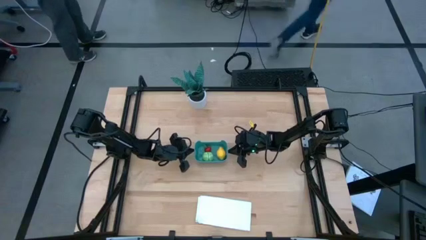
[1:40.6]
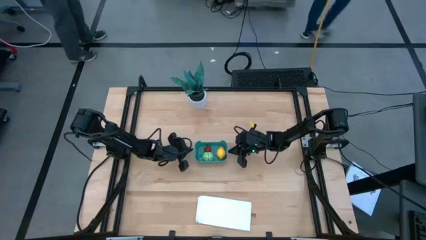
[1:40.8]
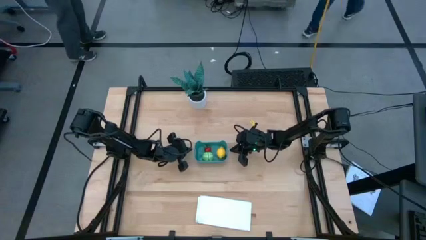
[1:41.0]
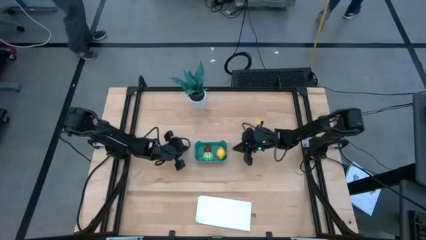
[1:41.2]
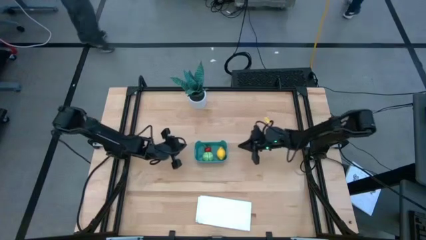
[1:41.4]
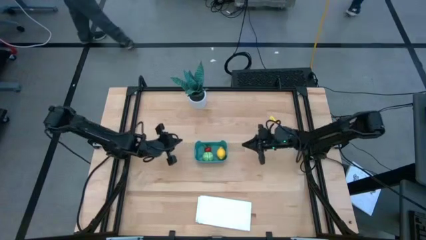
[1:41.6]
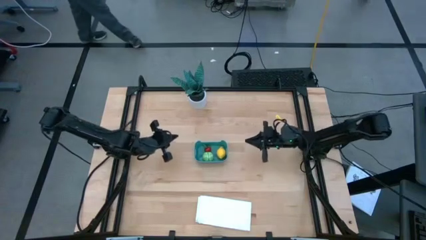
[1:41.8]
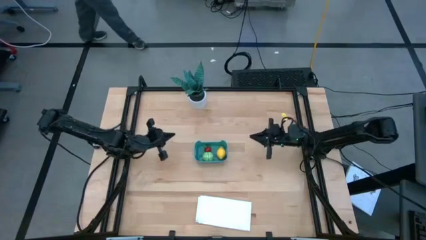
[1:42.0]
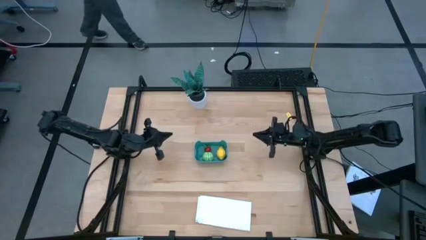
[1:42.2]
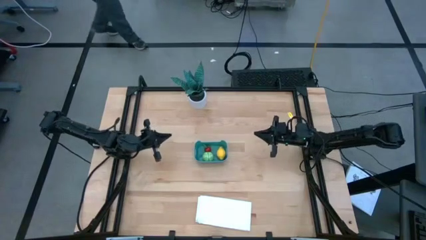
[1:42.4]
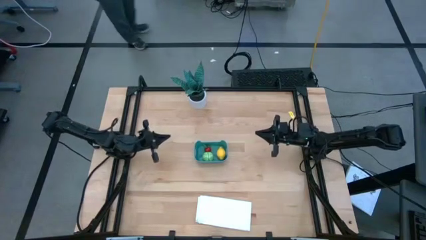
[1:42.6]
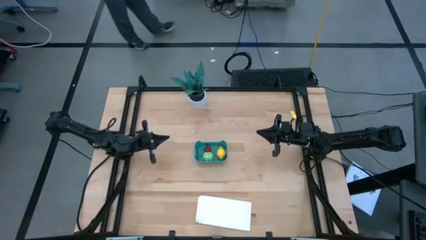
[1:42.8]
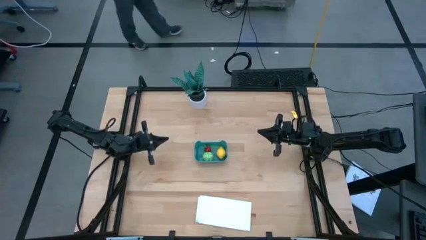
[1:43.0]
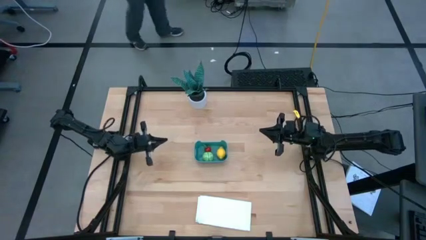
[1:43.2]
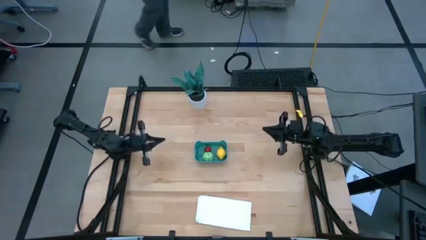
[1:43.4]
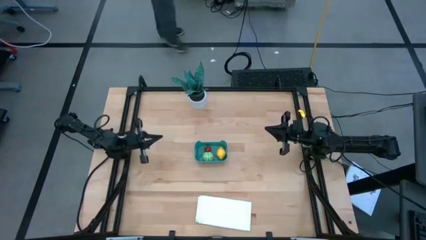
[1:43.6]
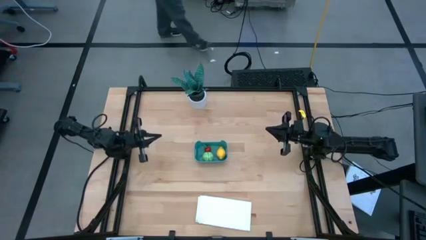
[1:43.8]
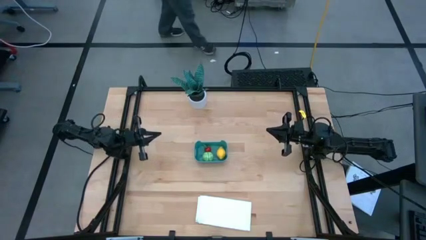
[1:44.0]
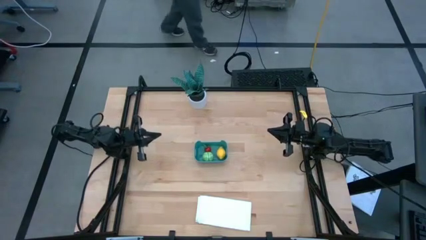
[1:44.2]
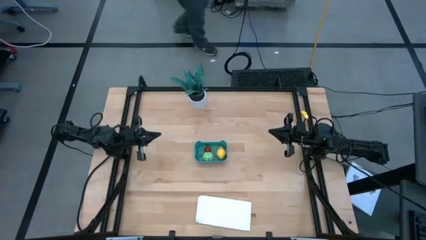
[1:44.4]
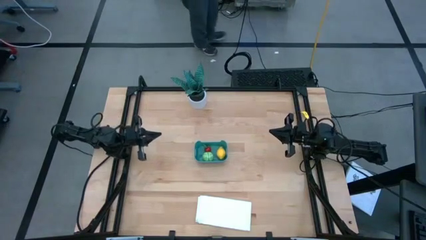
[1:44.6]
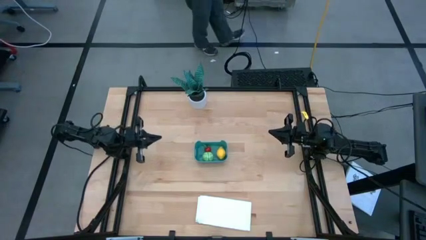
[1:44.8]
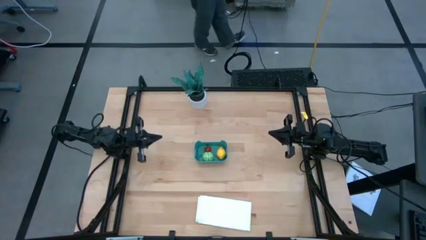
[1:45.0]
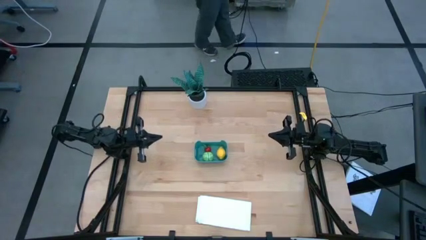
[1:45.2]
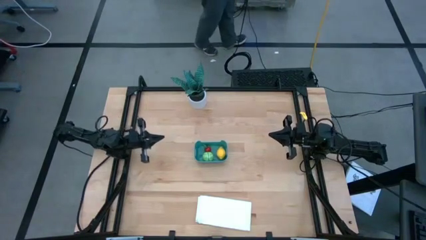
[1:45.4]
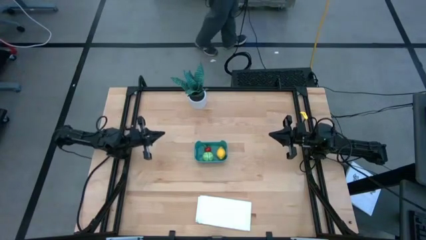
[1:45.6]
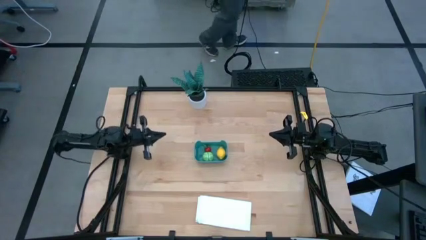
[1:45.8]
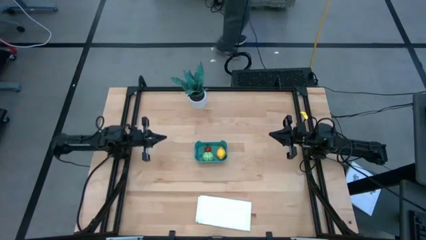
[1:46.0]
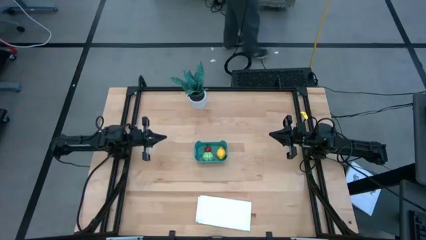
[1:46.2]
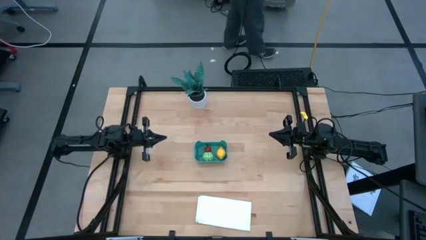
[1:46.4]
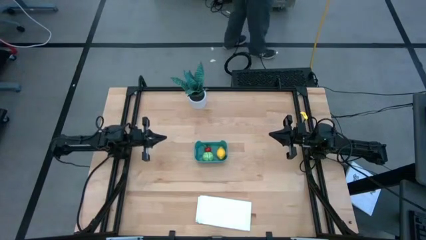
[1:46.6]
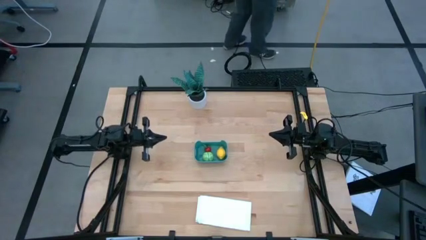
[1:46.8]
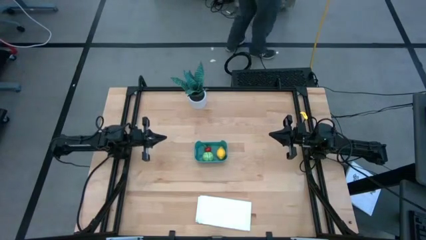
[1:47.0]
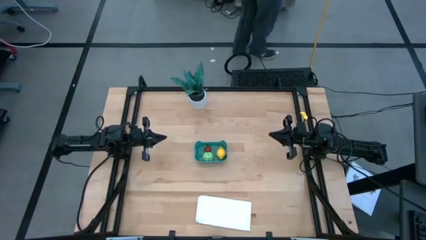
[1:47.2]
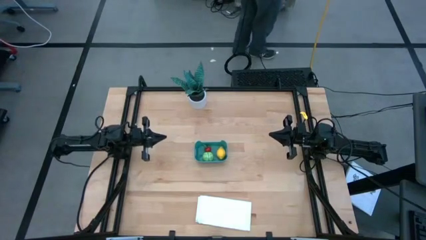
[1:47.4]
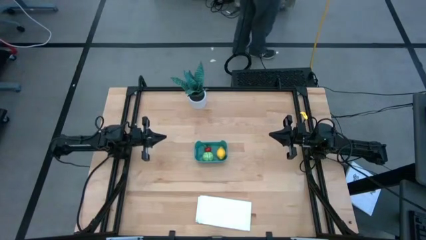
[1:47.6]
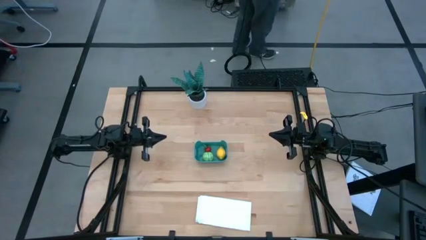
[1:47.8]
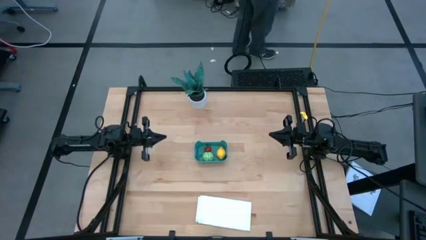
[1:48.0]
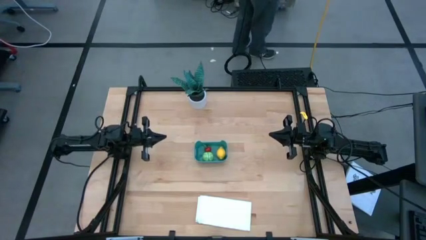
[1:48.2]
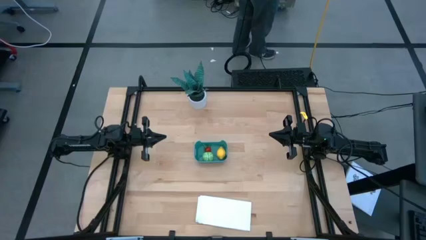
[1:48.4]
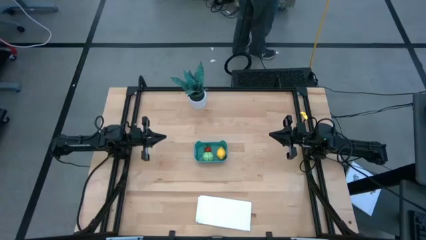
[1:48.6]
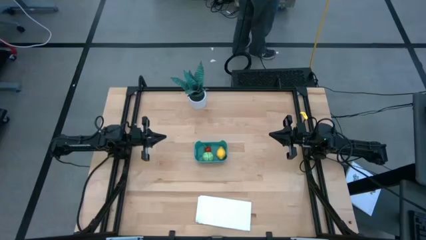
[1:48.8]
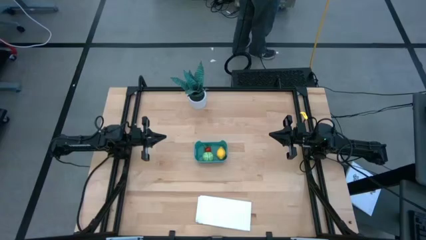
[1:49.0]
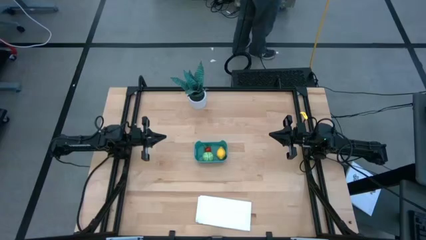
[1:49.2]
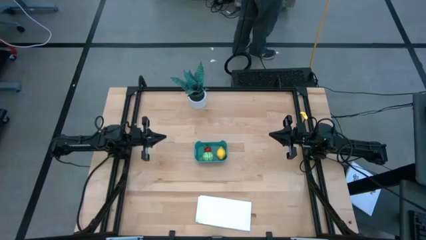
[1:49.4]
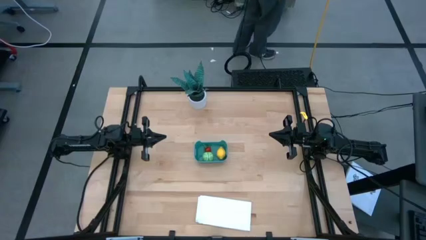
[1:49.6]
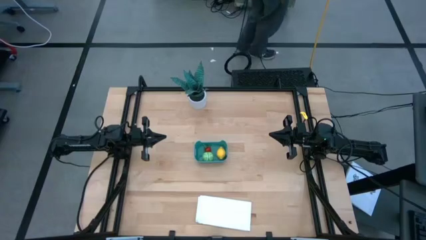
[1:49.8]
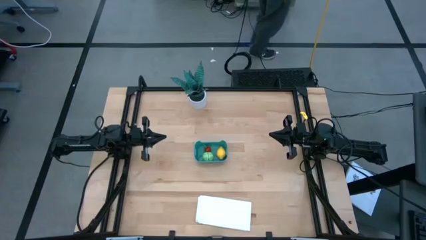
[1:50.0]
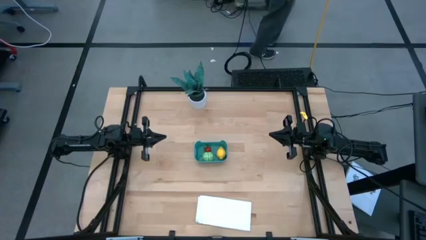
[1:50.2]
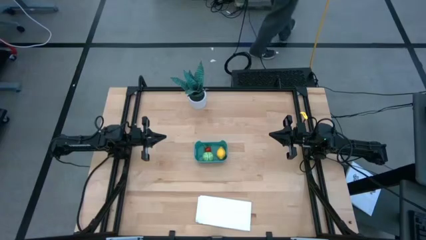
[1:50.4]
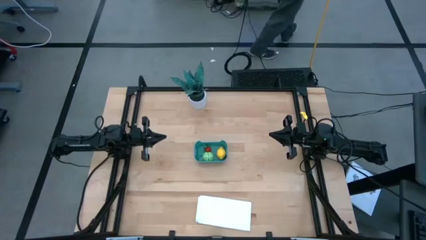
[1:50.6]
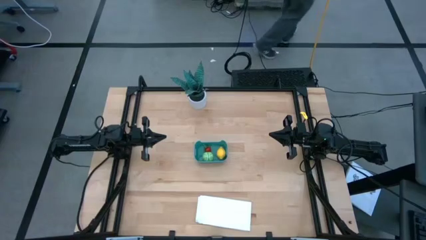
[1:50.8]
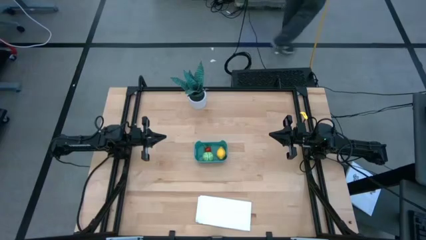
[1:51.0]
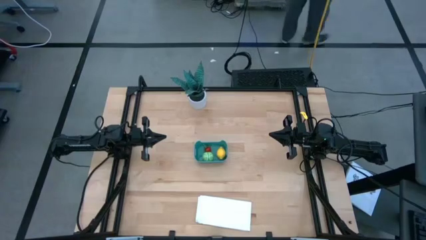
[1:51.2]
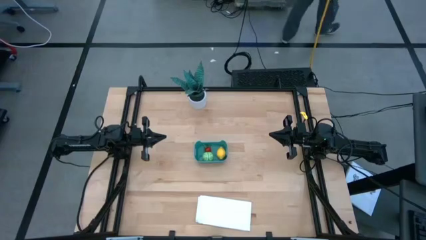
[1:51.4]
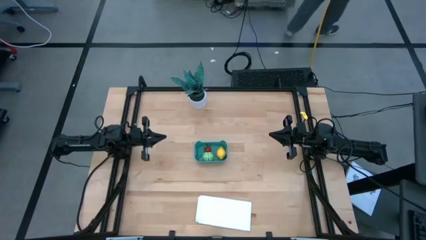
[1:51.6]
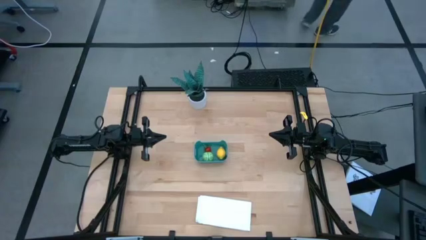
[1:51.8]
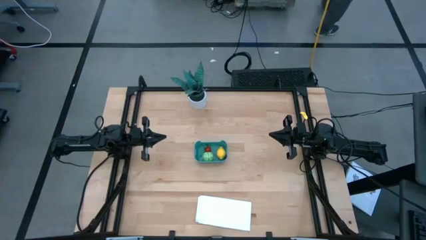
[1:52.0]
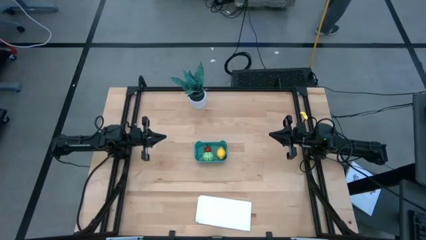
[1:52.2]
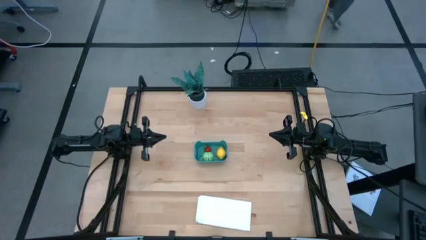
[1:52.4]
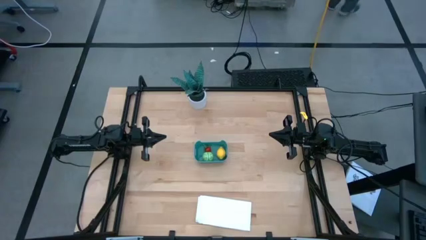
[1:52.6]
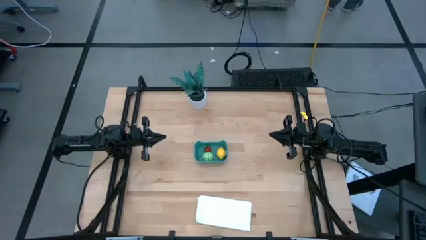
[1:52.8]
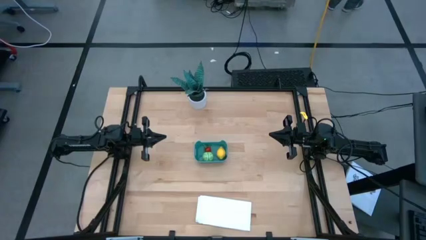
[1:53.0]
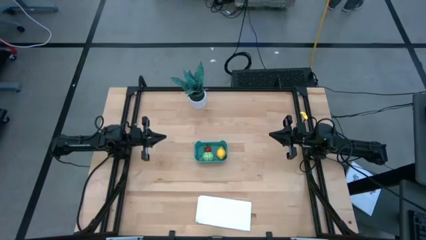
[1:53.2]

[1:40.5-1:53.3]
Task: Pick and placing Produce into tupperware
Return to Home Position
